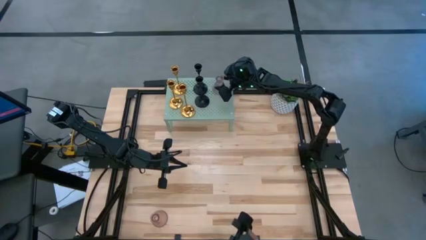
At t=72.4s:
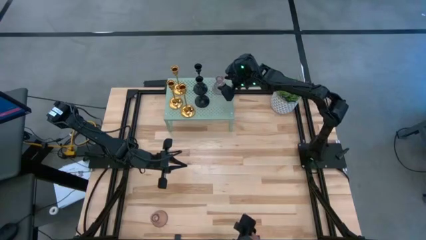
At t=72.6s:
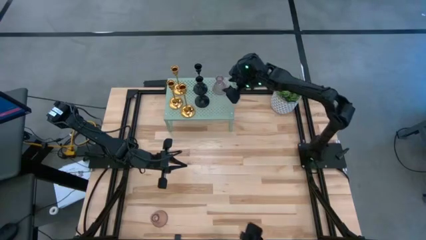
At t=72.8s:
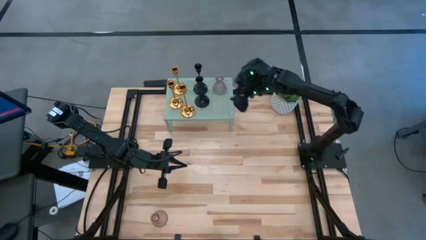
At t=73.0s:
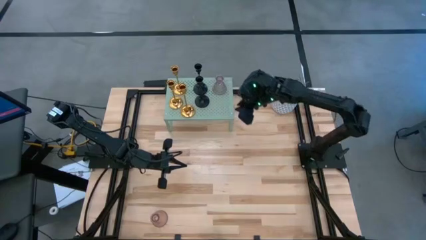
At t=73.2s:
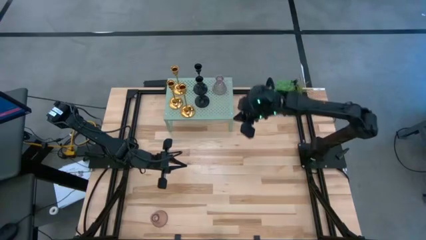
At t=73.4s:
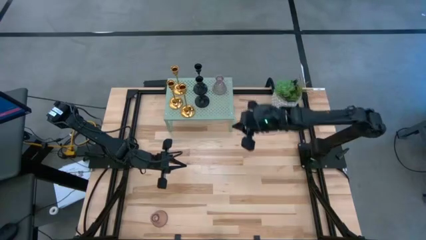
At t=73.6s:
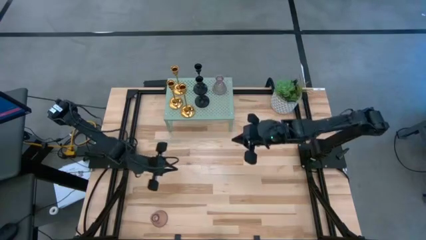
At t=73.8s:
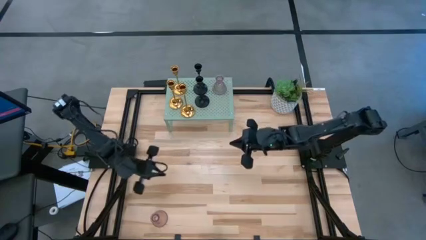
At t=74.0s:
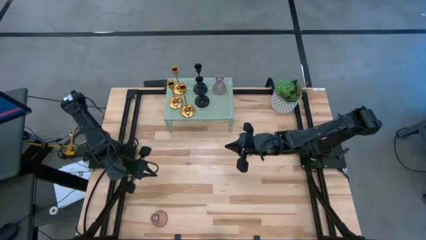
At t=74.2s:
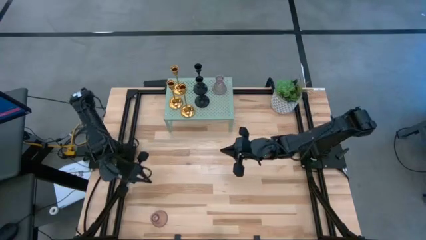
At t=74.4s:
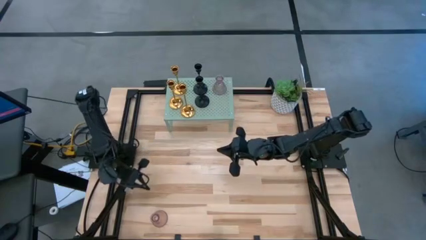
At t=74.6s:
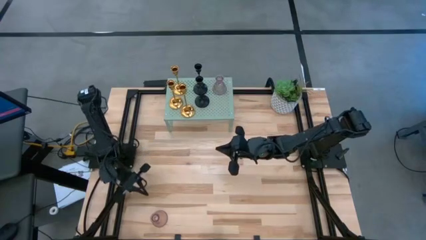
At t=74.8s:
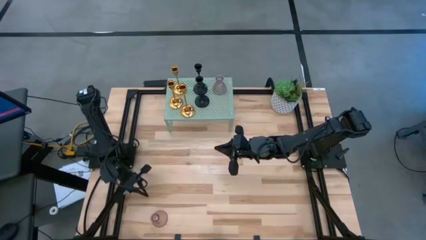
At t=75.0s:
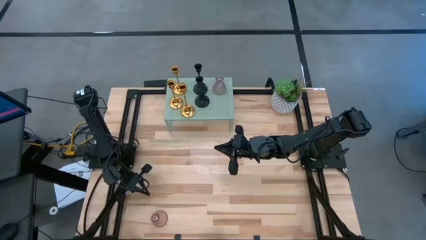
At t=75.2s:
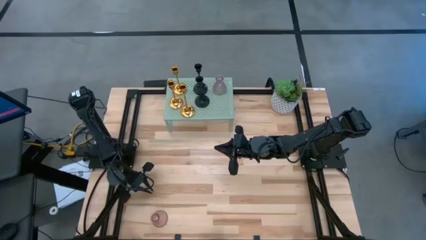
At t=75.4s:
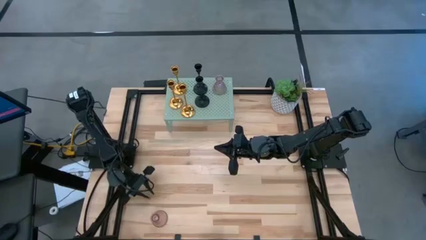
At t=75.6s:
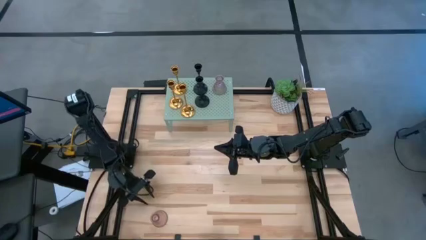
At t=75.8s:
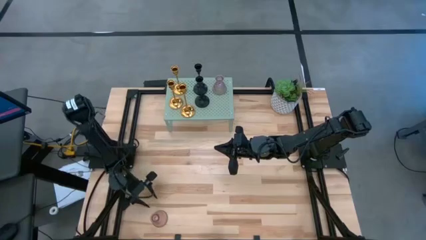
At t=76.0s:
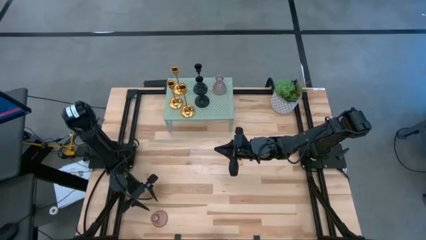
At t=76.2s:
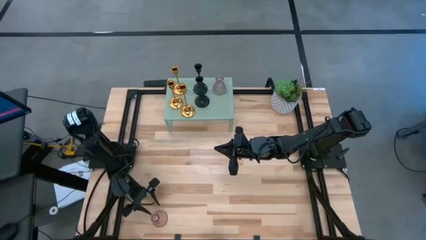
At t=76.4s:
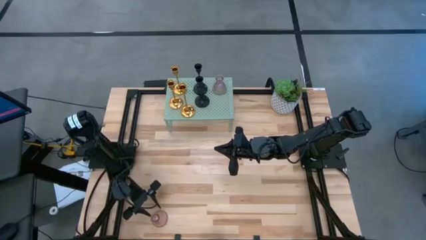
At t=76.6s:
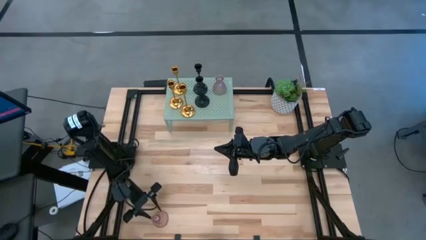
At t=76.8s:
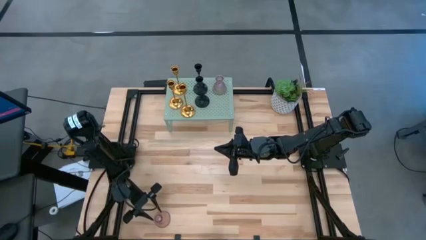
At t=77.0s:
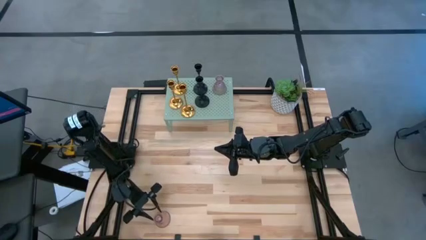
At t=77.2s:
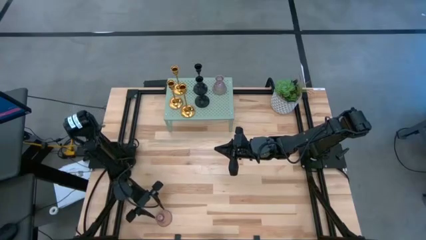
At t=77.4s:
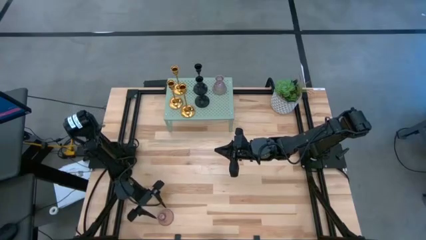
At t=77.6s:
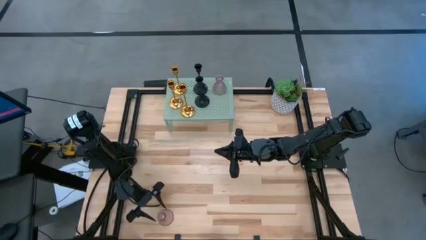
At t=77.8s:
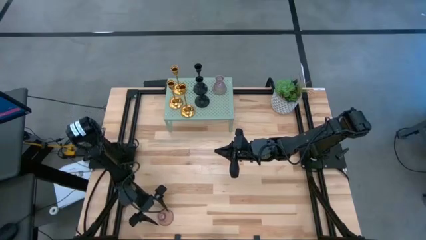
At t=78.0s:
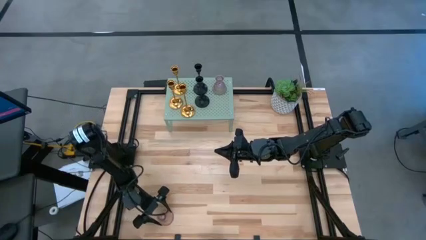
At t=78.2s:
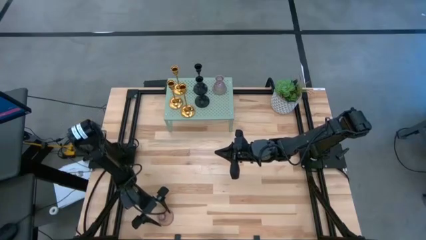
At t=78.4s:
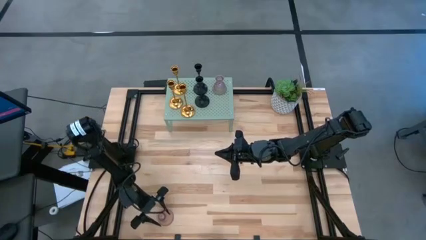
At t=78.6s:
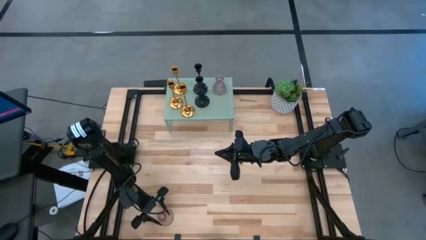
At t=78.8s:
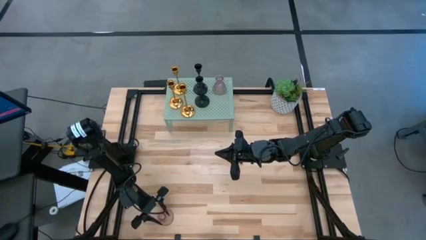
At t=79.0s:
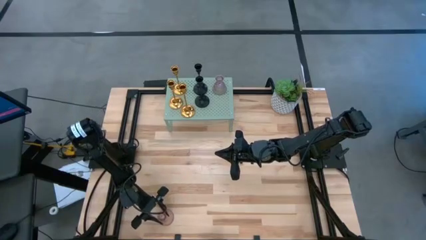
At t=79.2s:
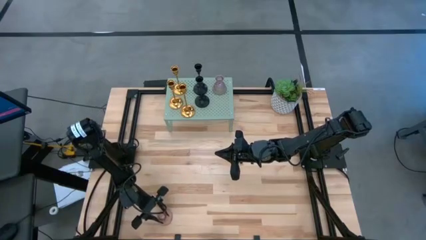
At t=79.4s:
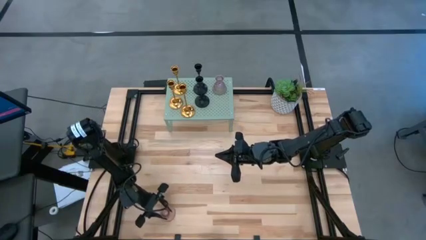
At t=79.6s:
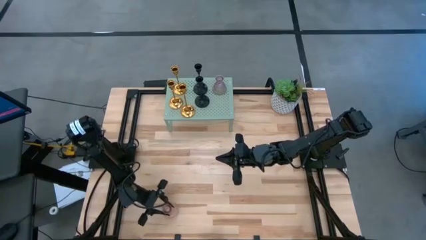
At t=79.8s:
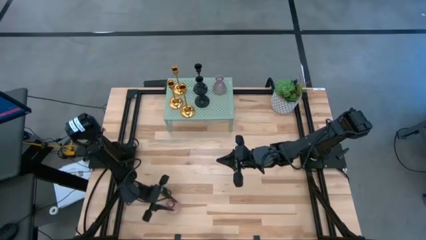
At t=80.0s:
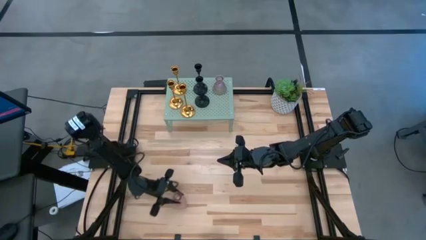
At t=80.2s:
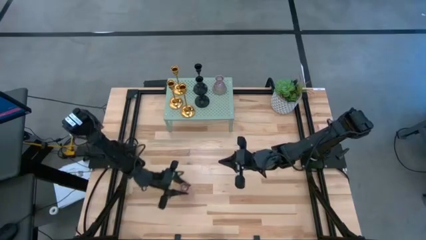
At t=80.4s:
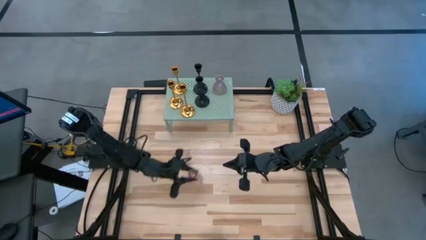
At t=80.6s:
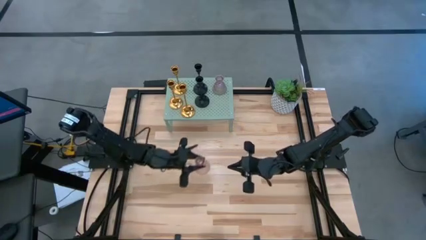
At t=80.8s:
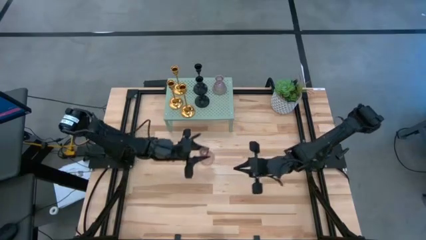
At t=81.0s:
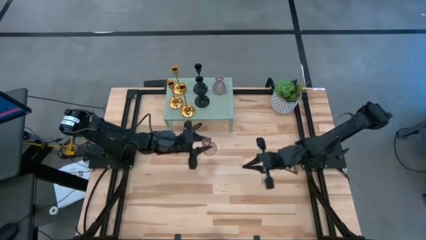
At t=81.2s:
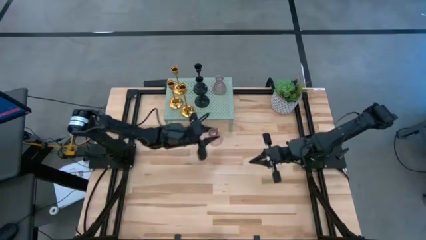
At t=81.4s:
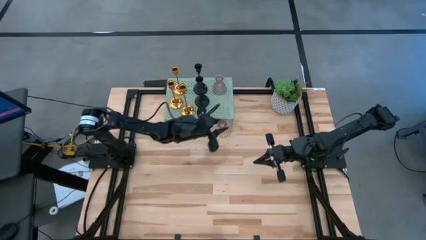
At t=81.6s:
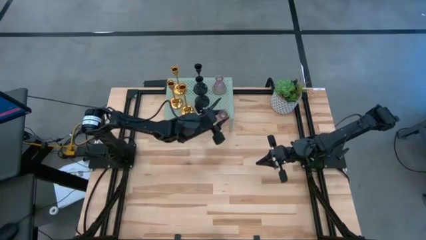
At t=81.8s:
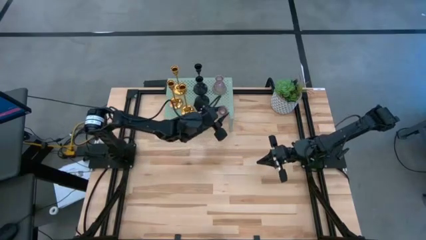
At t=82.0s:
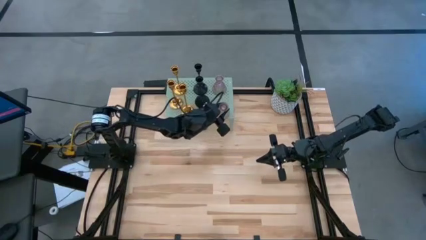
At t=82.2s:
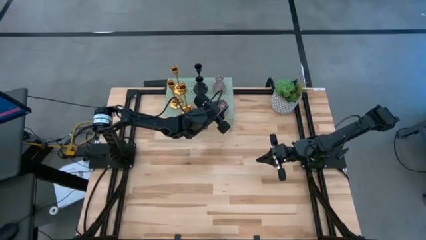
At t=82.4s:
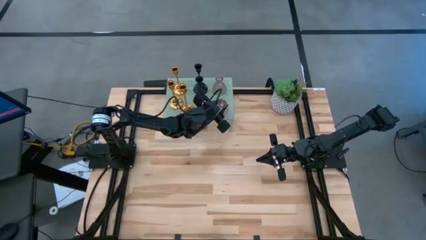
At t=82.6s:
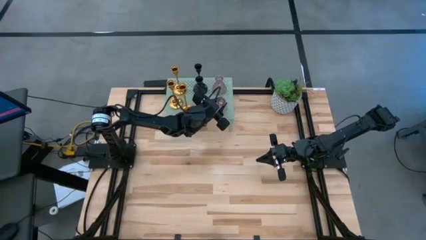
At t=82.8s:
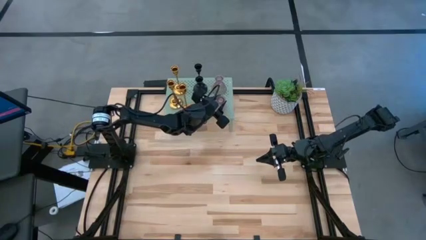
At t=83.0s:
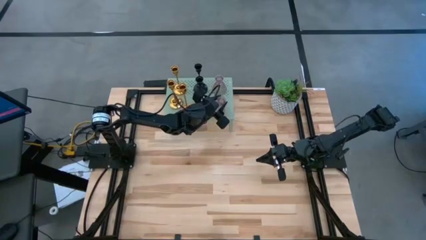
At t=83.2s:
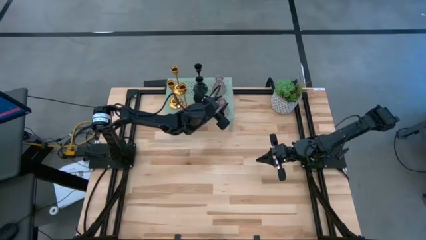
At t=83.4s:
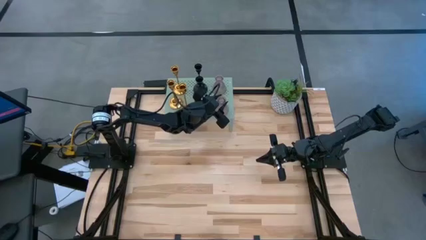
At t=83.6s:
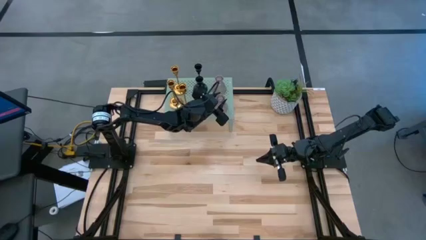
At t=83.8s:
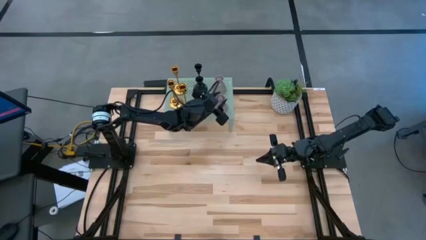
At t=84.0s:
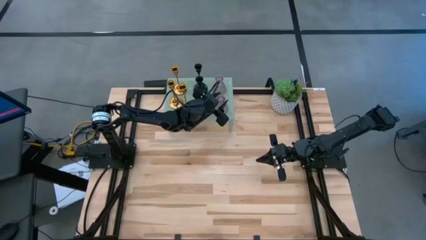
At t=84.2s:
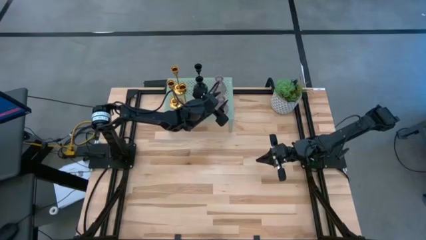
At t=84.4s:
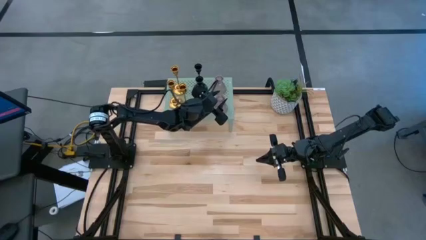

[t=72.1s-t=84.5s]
Task: Pick & Place candle stick holders
Put the purple glass candle holder on the shelf aligned with the other purple glass candle holder
